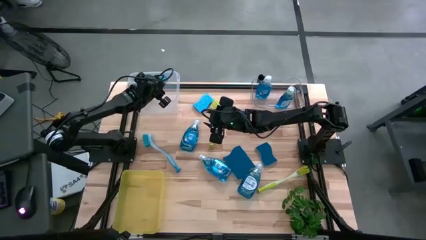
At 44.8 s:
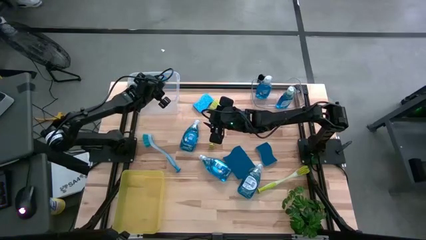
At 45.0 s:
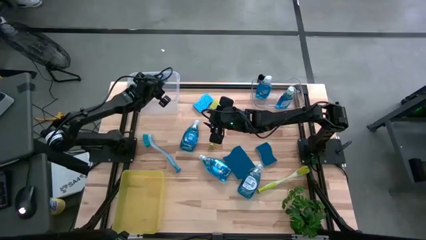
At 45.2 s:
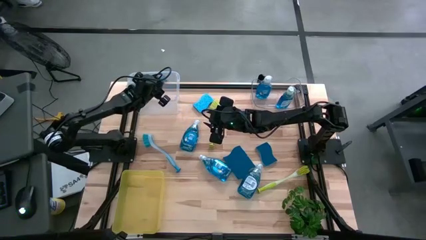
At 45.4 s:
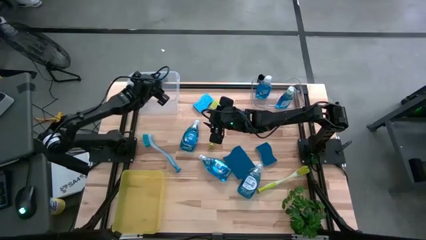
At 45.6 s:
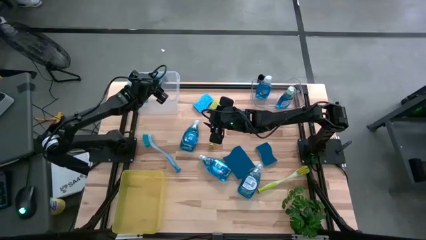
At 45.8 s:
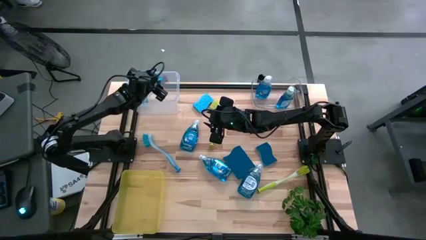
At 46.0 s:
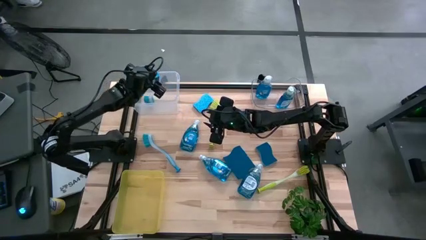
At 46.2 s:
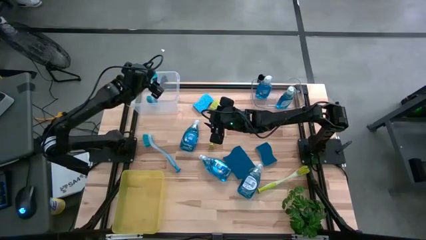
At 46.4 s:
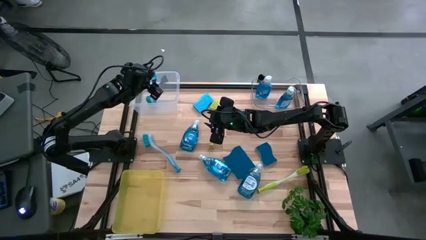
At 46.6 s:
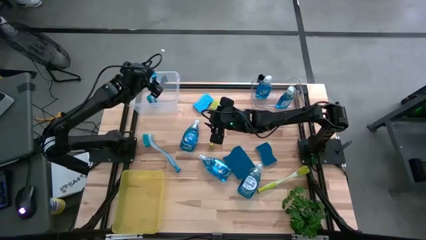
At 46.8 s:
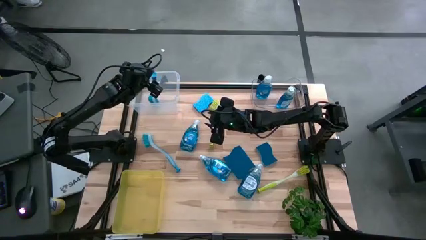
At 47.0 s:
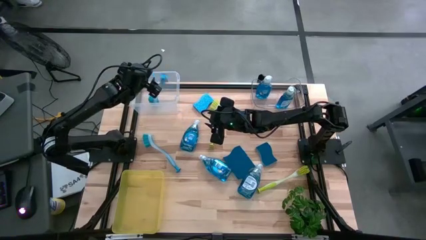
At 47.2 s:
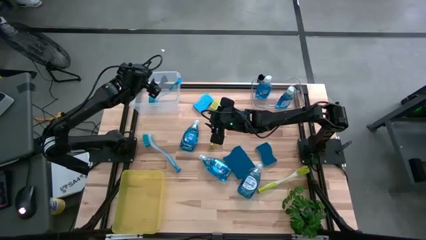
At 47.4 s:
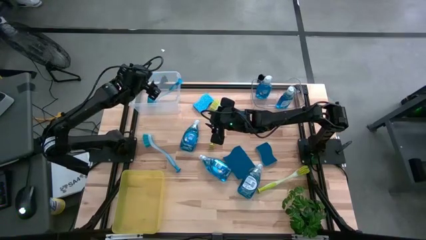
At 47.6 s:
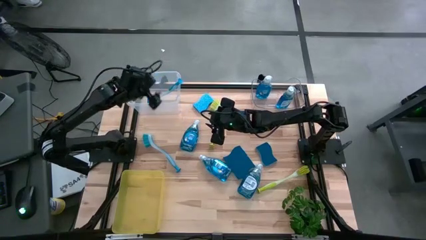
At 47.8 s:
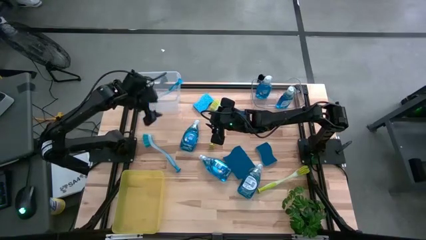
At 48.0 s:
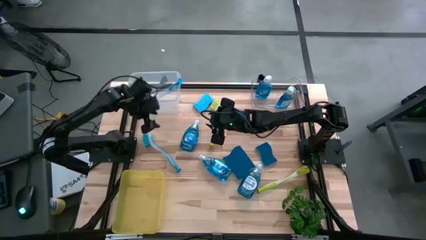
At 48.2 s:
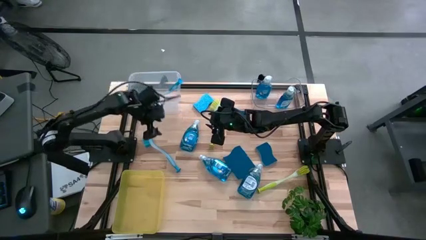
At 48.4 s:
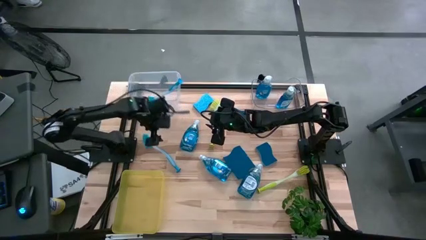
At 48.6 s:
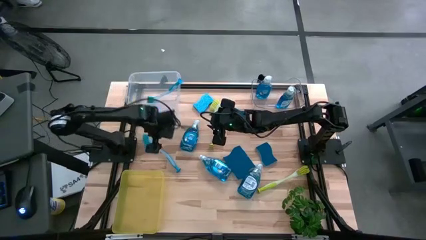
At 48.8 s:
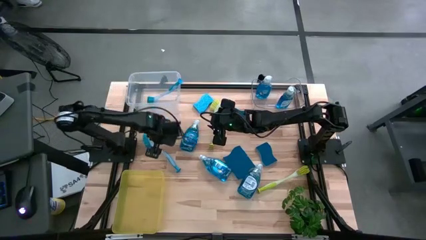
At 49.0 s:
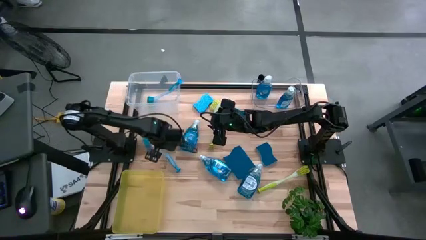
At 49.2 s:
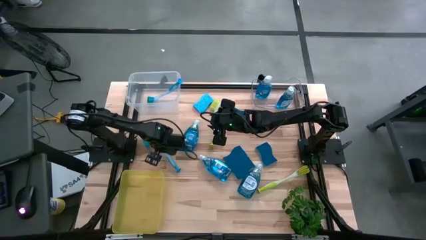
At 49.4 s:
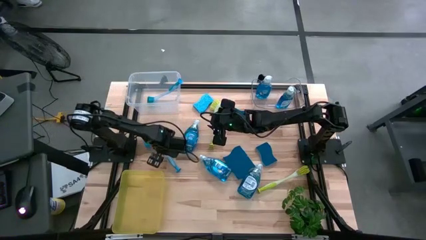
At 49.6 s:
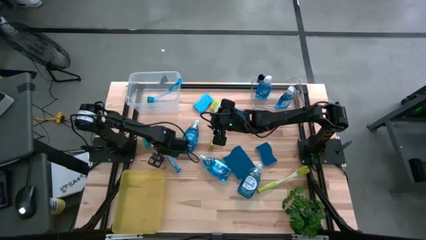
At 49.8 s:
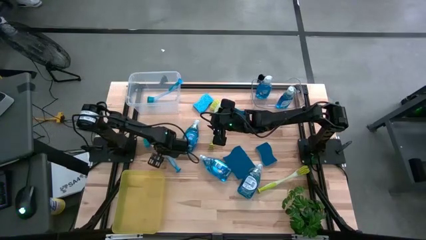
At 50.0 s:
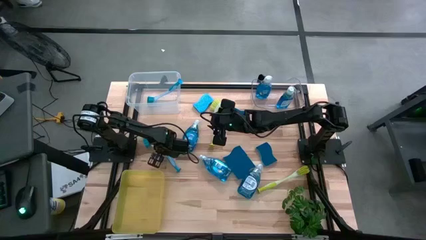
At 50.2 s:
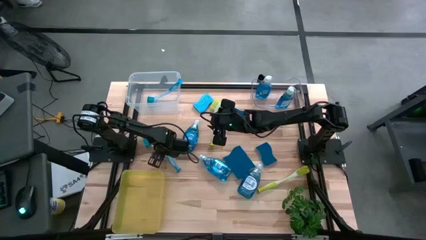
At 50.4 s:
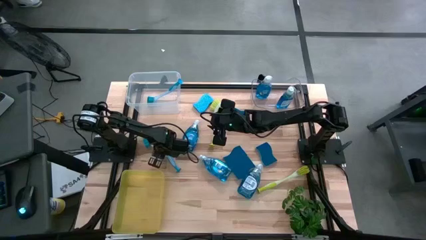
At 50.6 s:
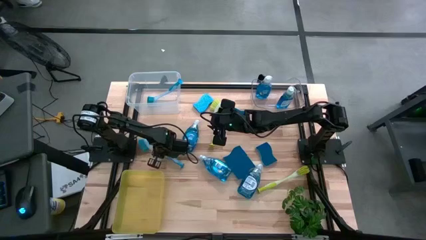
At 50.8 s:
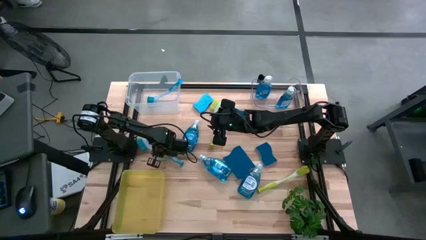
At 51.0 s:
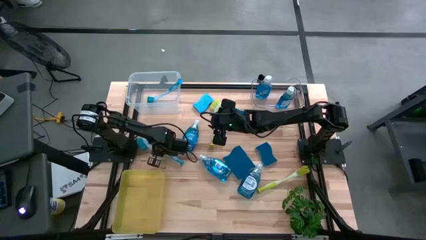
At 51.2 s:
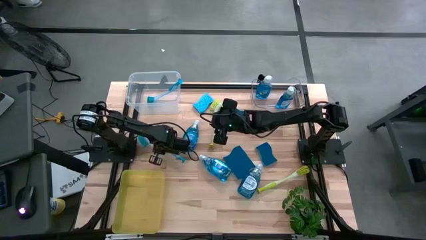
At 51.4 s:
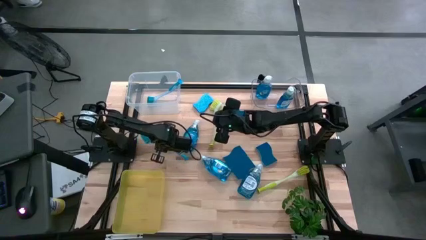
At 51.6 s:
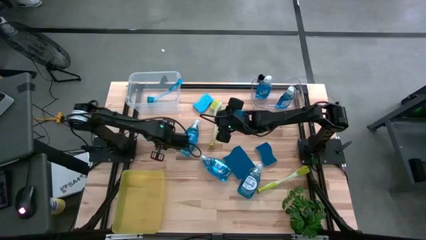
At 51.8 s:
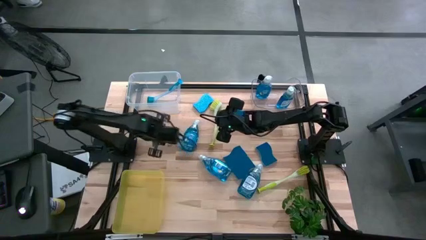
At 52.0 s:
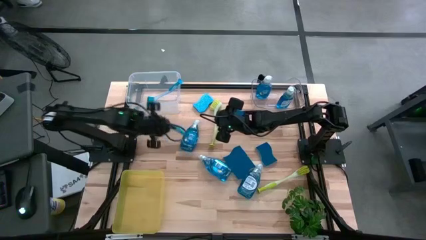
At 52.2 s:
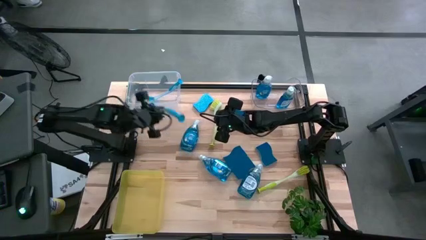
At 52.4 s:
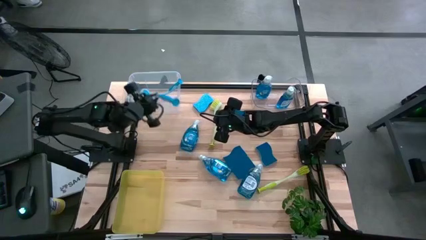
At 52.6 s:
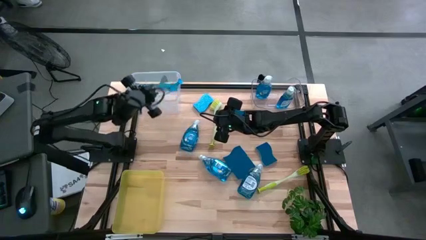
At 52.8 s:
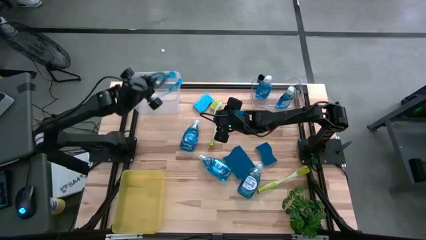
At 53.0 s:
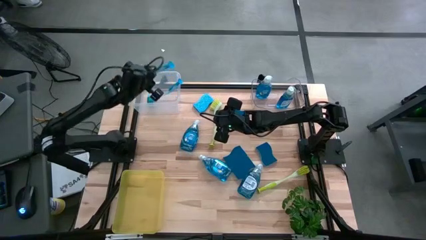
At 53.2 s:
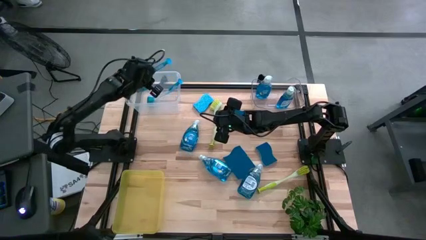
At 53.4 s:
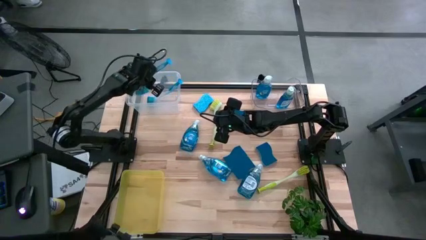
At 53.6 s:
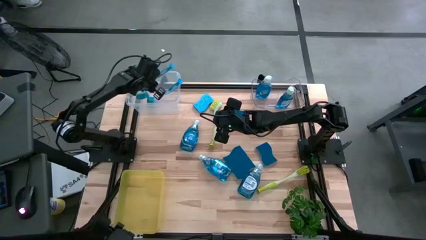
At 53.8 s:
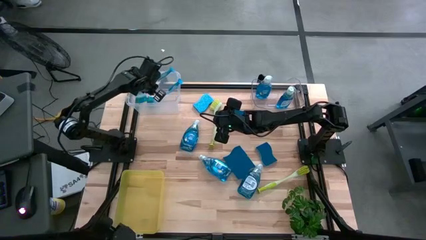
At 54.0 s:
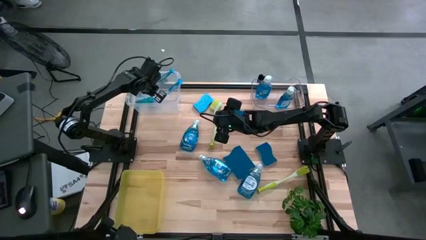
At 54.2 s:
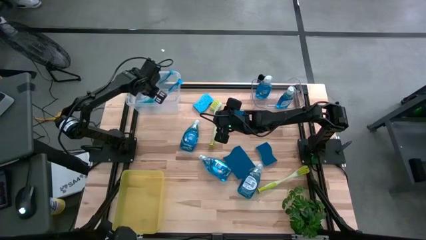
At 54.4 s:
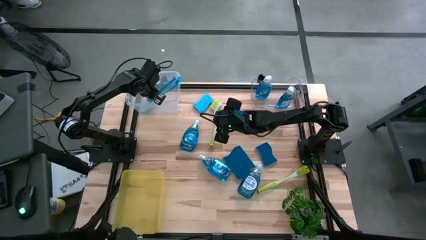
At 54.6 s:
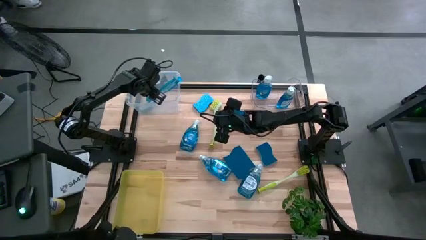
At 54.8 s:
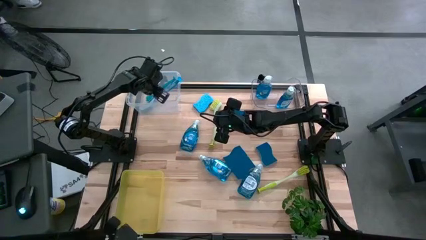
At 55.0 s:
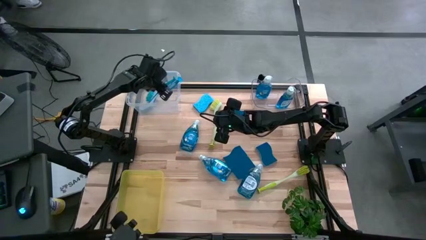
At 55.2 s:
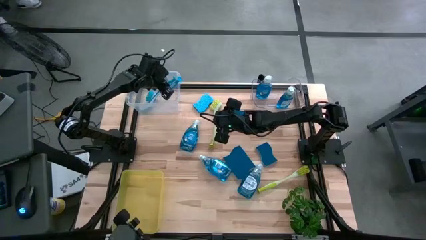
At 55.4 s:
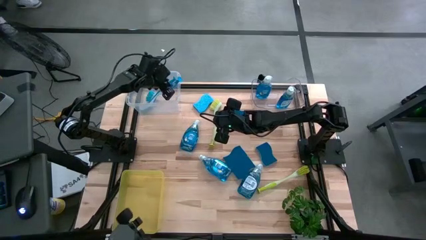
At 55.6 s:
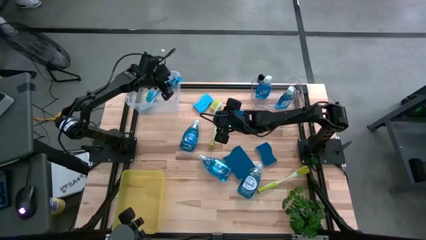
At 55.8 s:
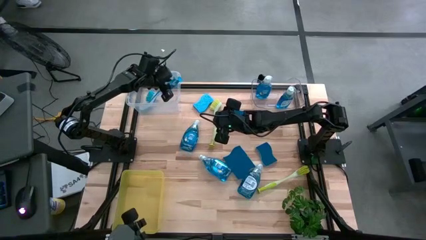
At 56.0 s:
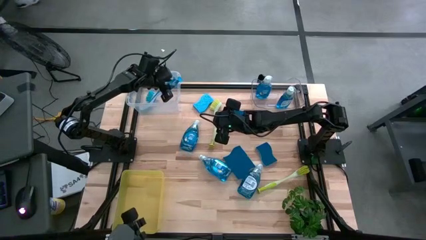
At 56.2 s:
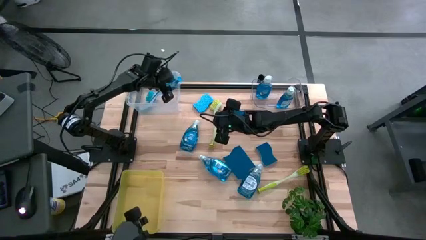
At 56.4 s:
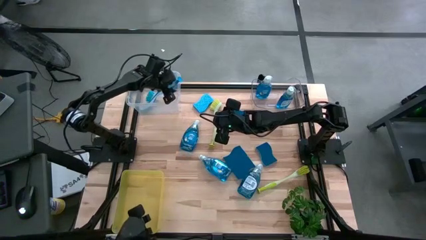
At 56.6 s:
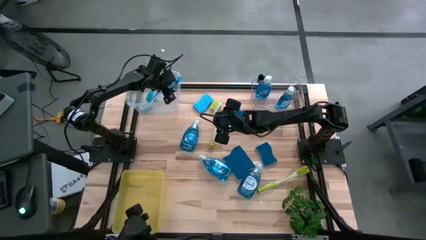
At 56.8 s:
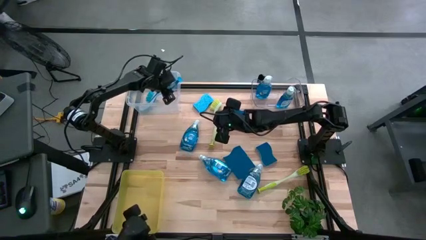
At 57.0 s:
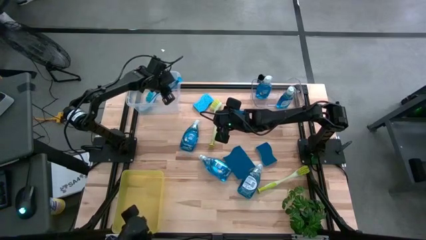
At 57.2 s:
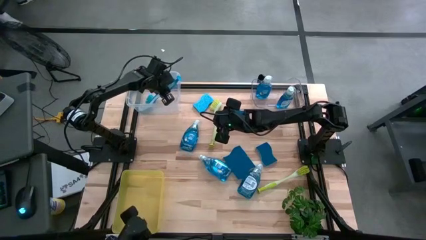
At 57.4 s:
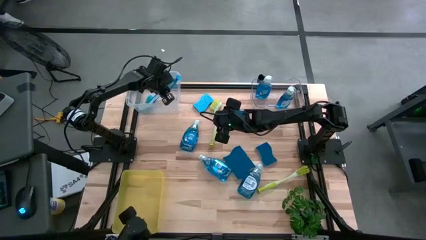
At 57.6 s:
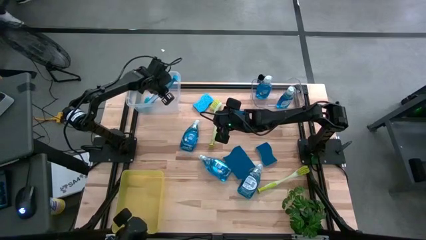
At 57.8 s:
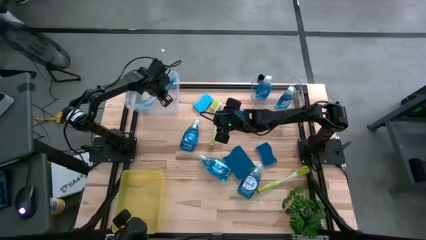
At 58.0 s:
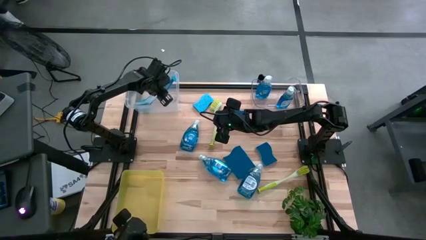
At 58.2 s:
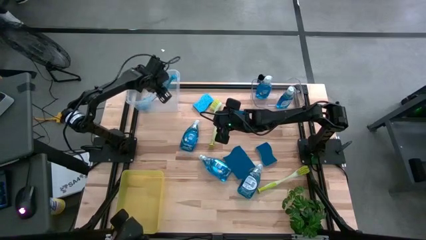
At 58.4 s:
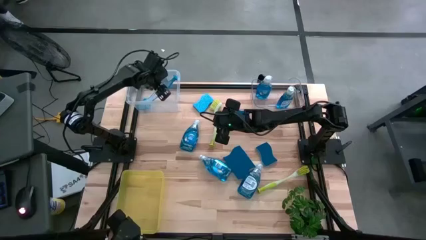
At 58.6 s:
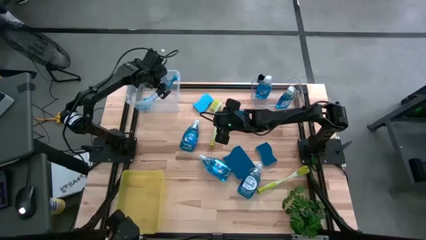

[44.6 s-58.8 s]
Task: Pick & Place Kitchen Sink Supplies
Put the blue dish brush into the white transparent bin

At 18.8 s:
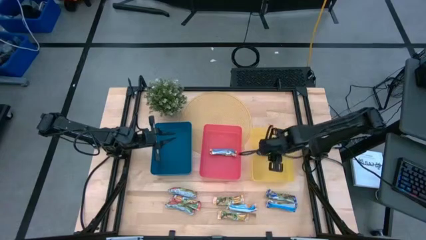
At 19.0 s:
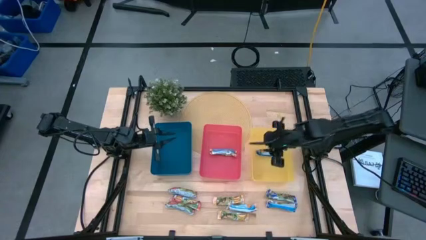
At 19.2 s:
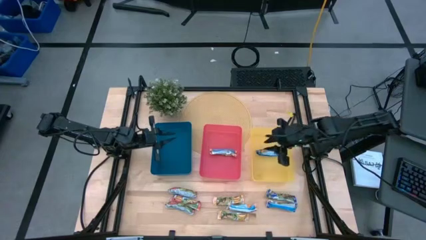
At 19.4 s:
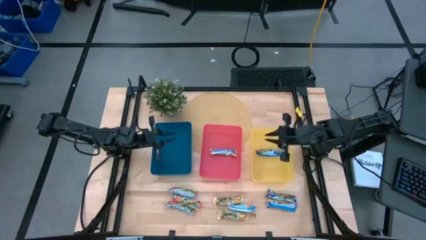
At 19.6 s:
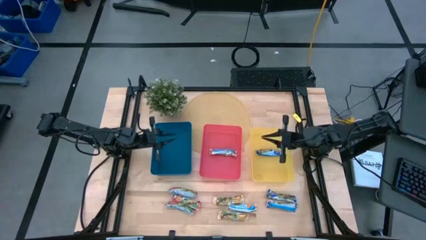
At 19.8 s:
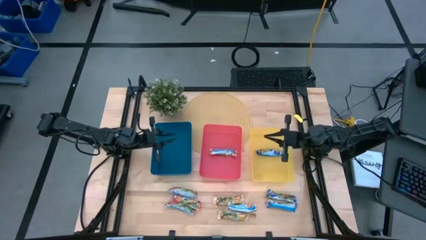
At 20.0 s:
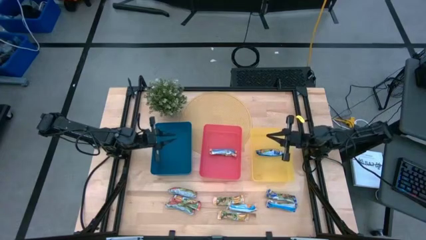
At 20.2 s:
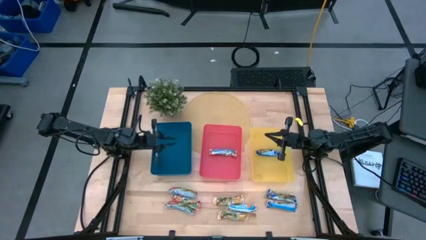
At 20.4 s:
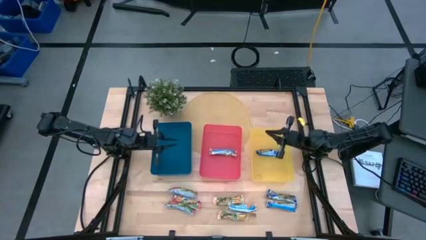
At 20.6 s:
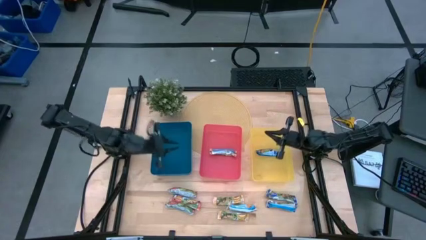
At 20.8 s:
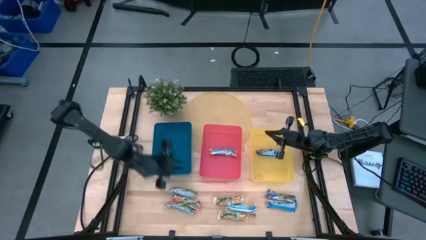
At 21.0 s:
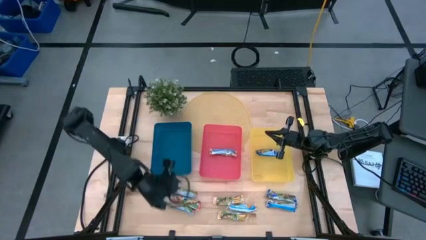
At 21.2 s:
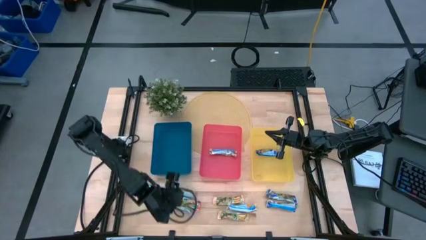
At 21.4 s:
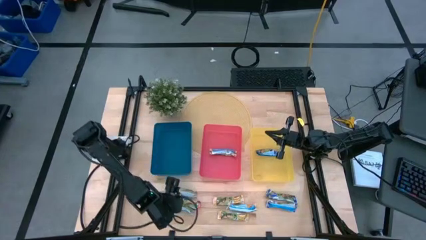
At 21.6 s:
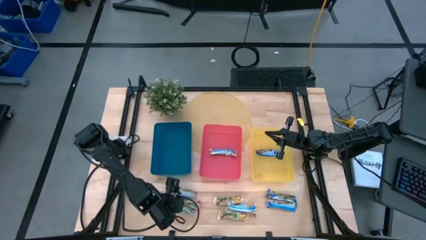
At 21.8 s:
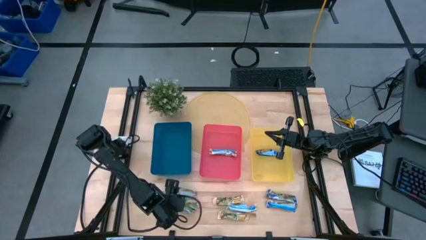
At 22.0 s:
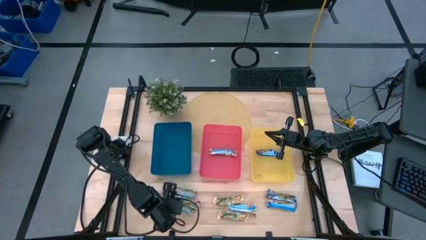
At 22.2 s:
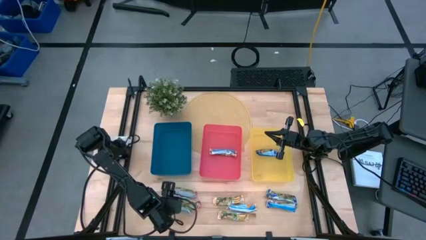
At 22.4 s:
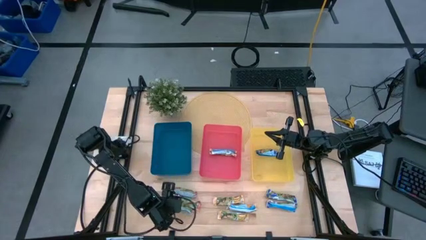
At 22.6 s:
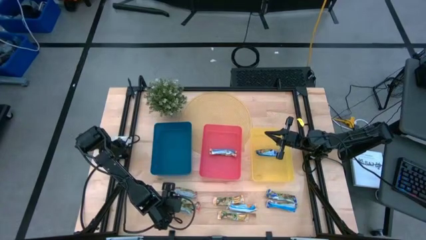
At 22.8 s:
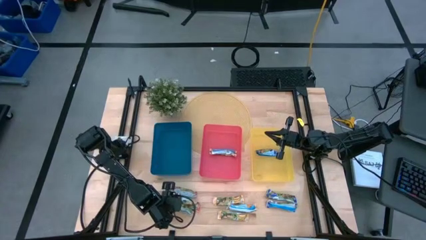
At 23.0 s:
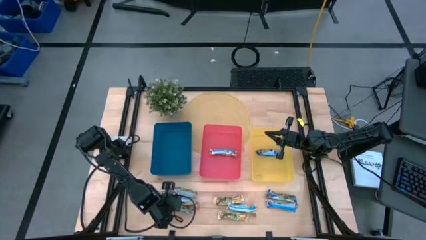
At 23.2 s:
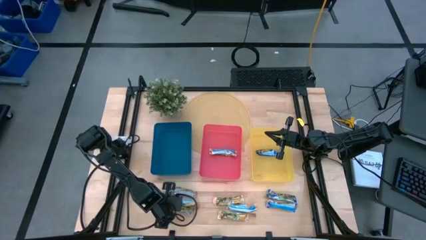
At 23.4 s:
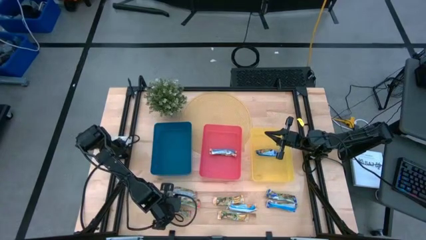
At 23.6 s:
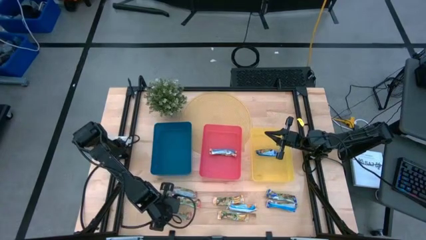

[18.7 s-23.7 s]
Task: Pick and place Granola Bars by type
Put the red granola bar into the blue bin
